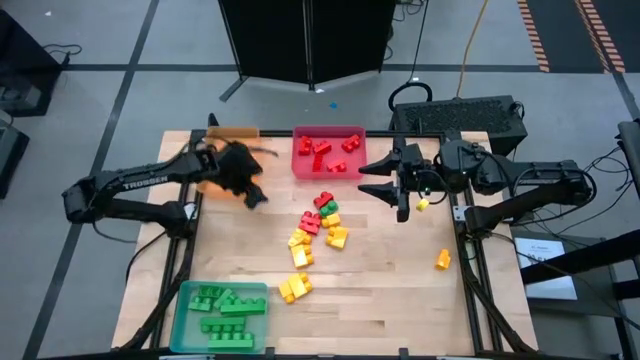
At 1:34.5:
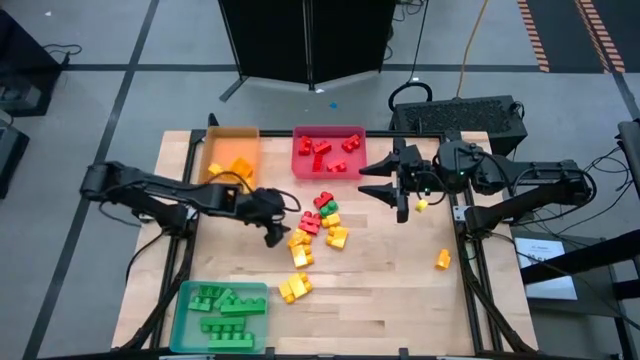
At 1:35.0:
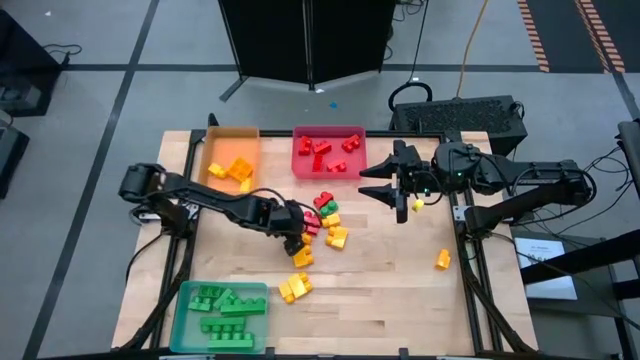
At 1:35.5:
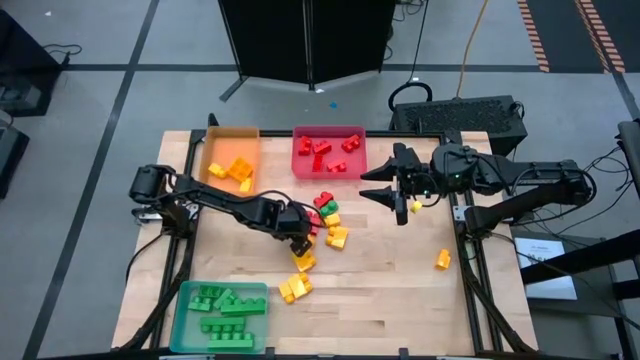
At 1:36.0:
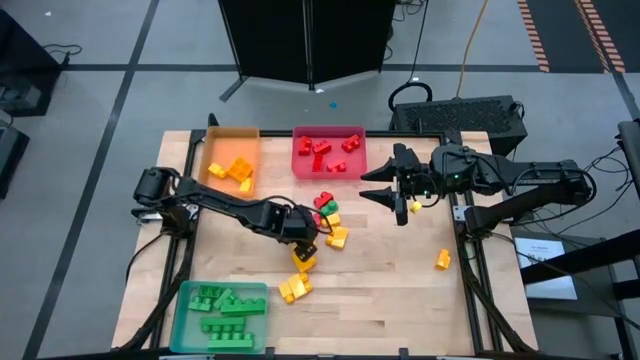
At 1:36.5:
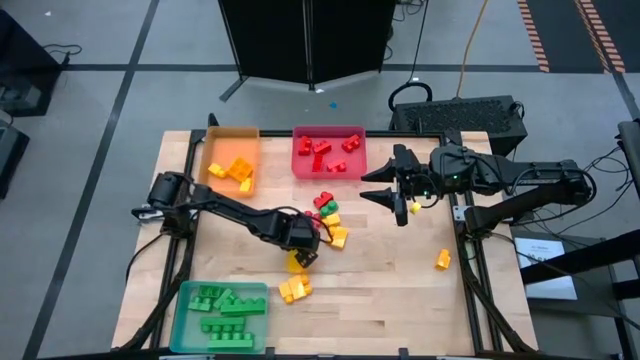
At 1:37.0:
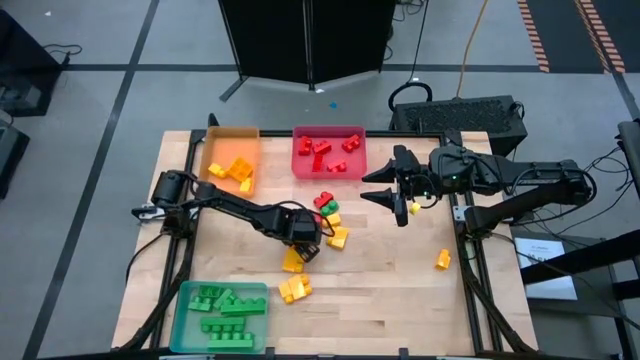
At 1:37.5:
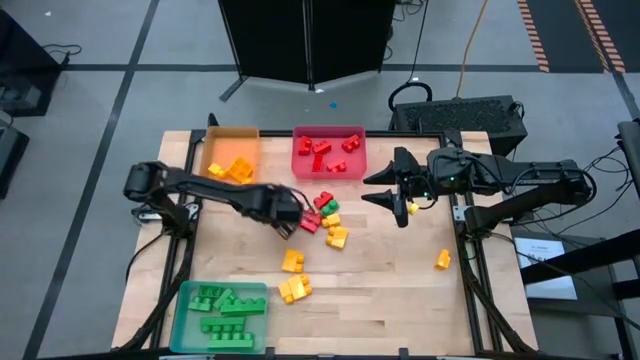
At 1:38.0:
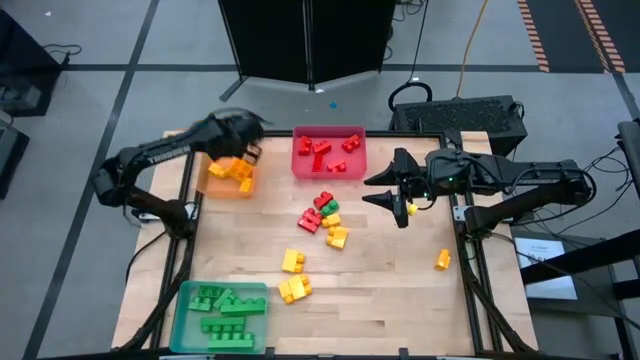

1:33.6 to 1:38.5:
Task: Sort blocks
Put the yellow game piece into the yellow bin

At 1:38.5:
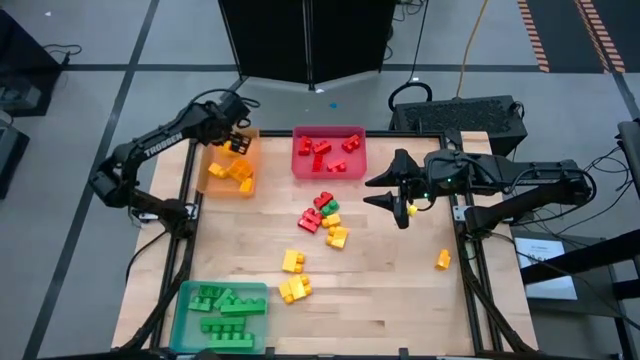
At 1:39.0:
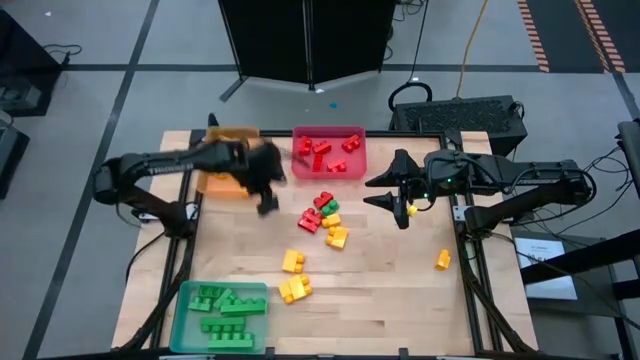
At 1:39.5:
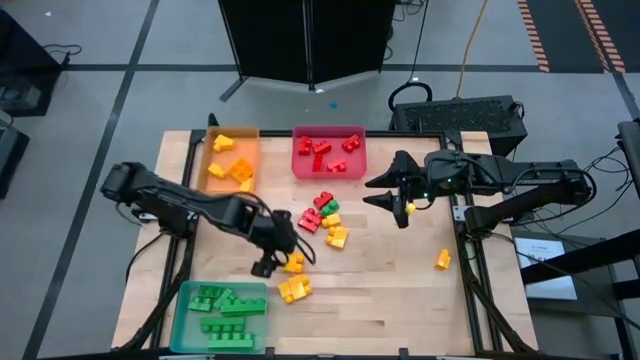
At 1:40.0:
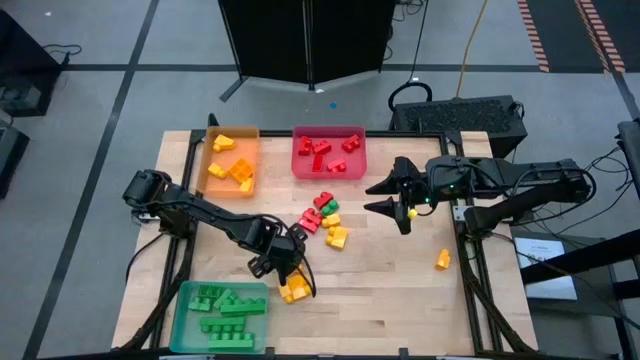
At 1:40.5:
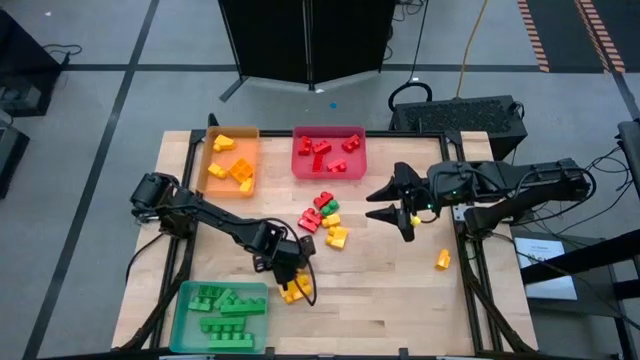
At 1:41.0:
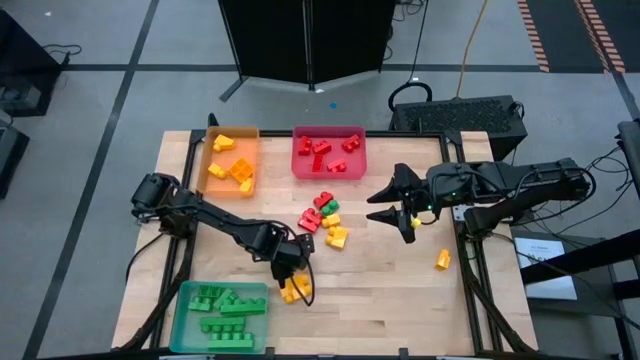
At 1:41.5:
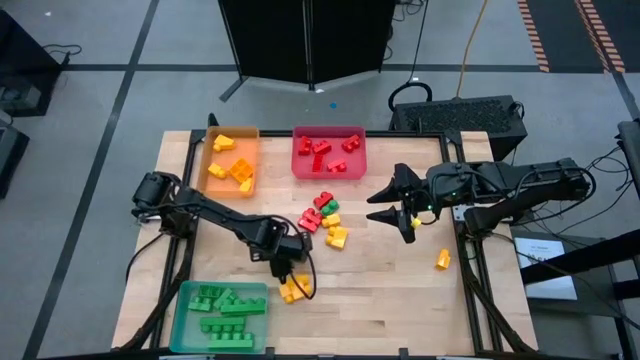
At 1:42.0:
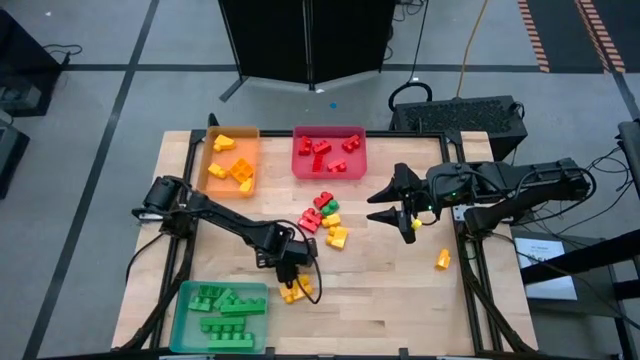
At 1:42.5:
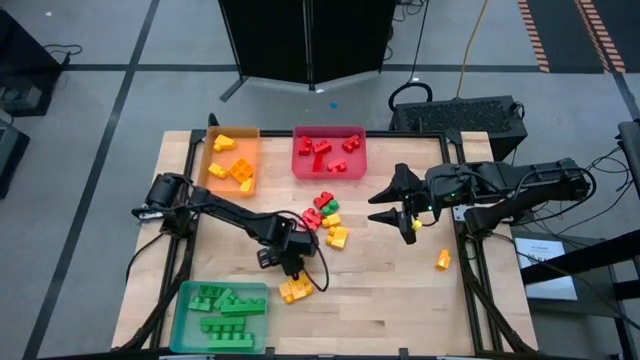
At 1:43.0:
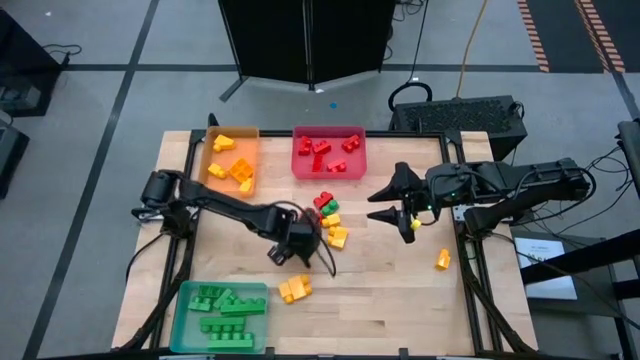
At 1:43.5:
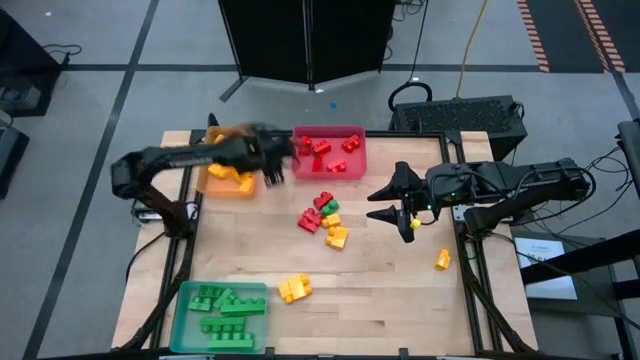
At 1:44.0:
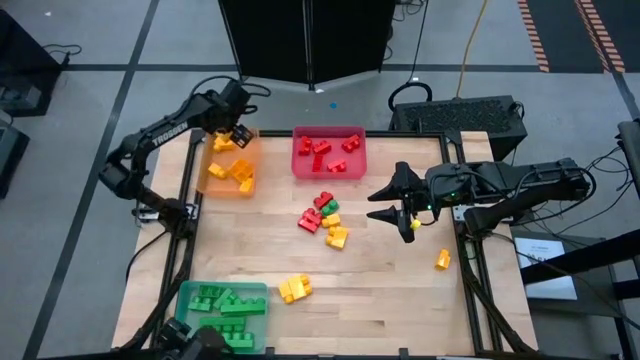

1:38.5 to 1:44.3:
Put the yellow game piece into the yellow bin

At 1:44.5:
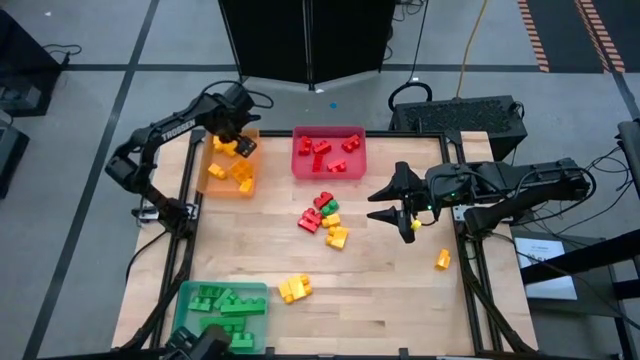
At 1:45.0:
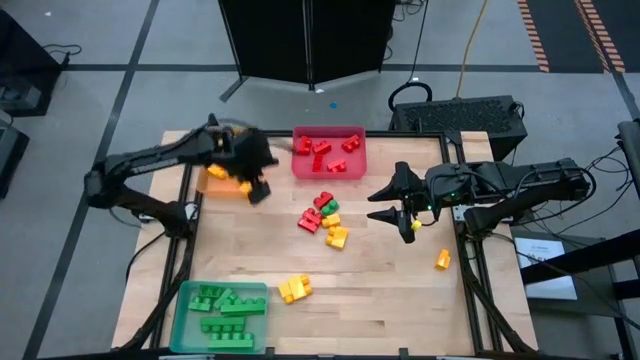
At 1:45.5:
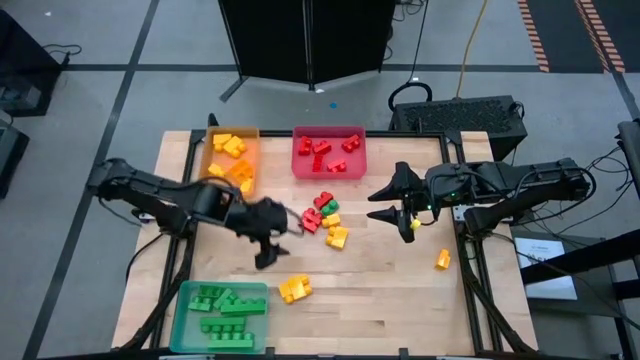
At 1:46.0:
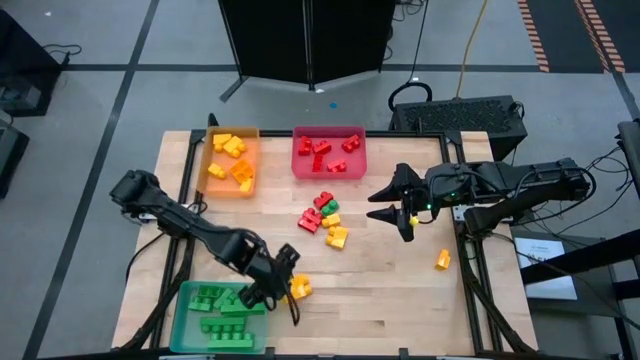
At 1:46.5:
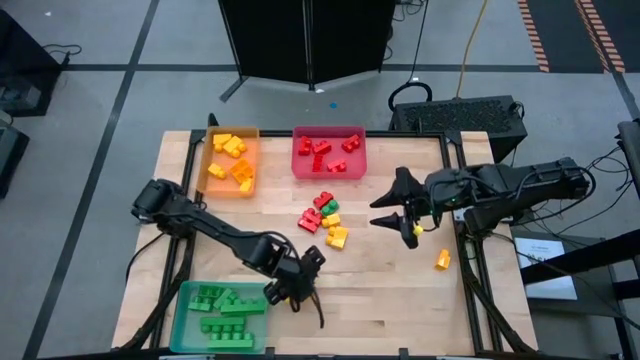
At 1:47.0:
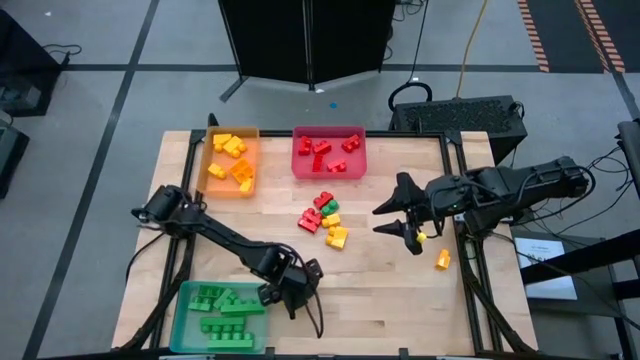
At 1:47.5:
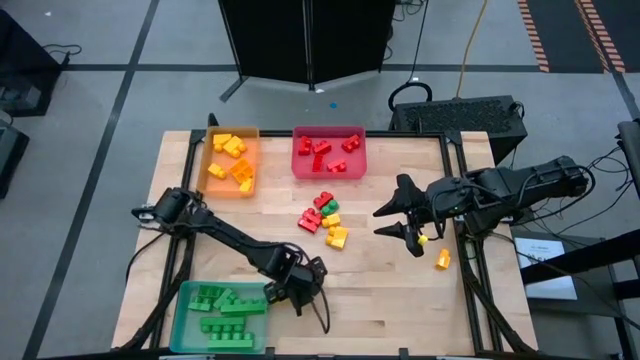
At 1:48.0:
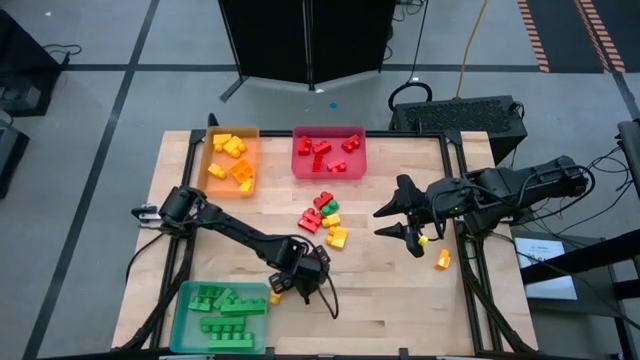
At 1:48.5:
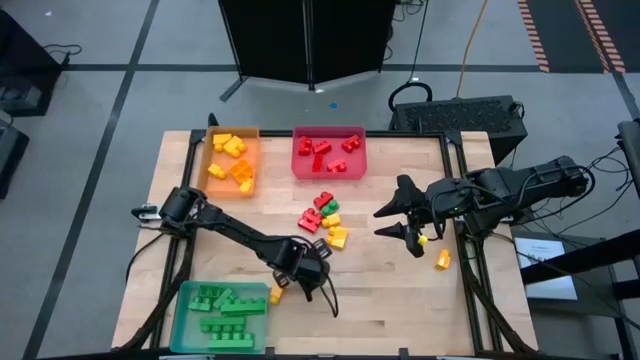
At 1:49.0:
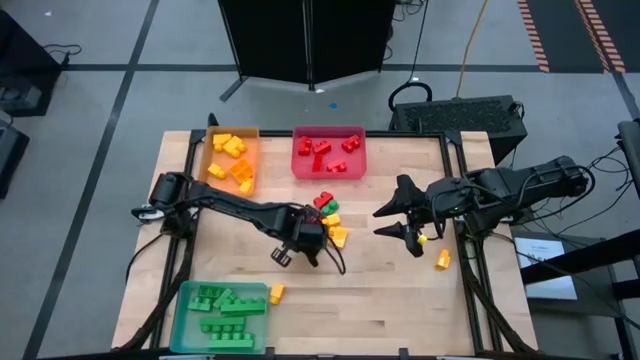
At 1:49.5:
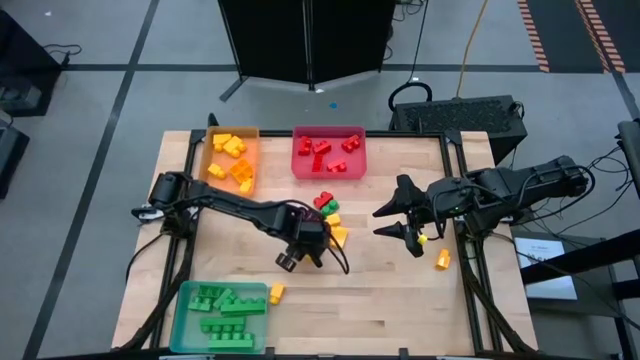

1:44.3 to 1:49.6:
Put the yellow game piece into the yellow bin

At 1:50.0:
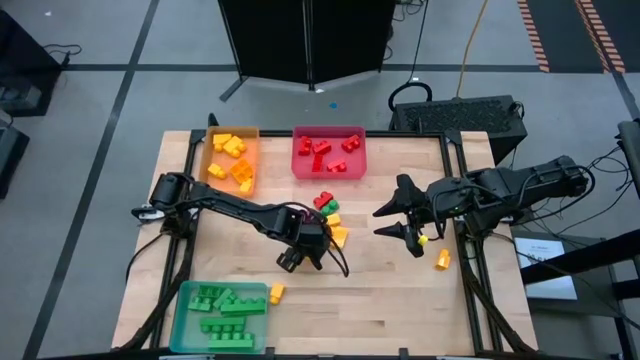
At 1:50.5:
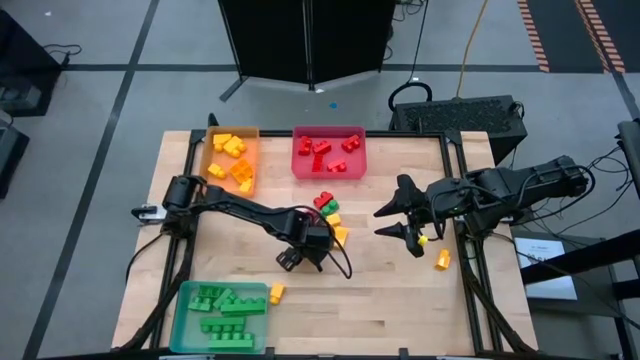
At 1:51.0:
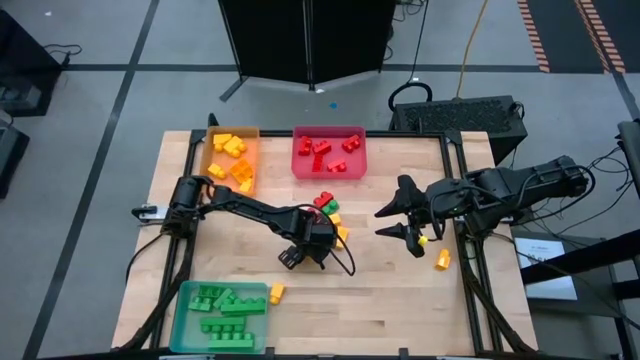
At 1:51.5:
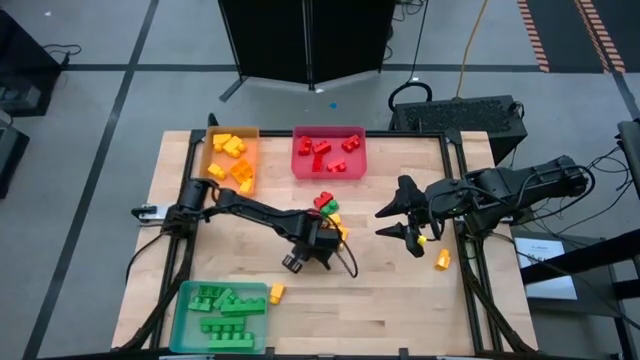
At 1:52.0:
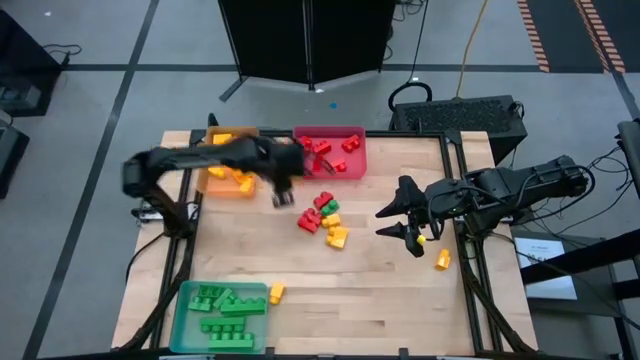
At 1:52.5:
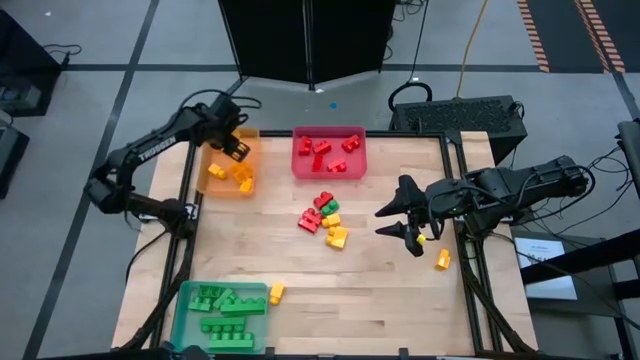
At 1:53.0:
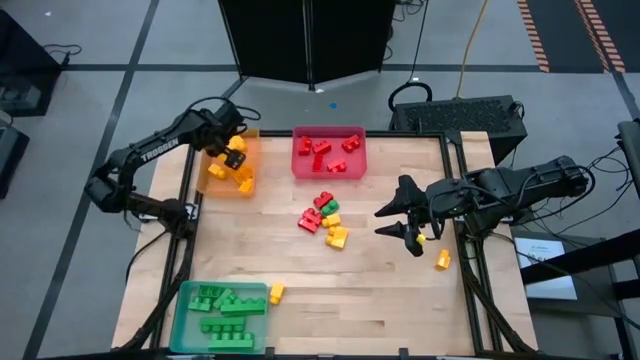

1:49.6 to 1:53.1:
Put the yellow game piece into the yellow bin
